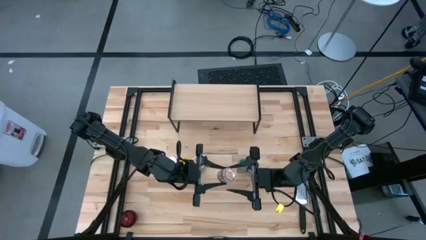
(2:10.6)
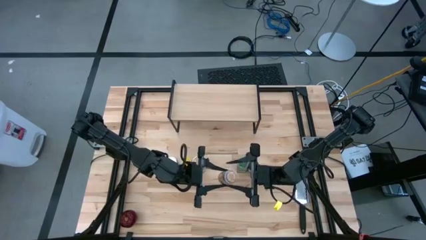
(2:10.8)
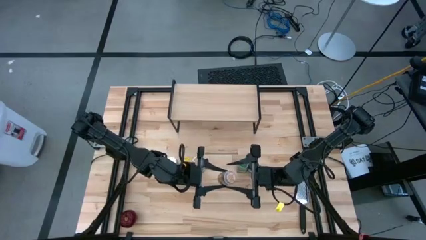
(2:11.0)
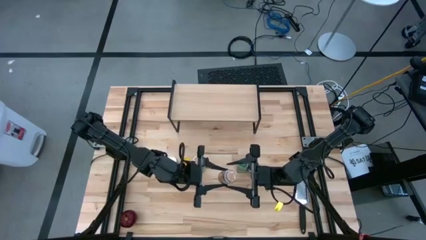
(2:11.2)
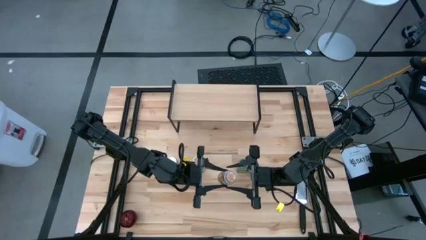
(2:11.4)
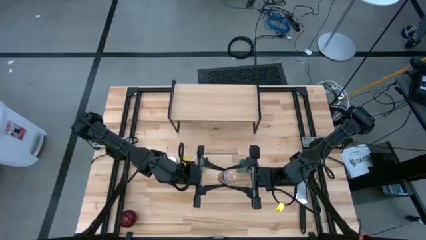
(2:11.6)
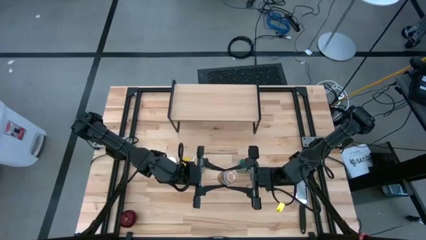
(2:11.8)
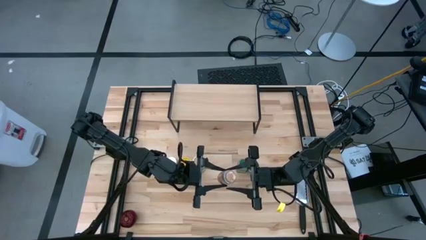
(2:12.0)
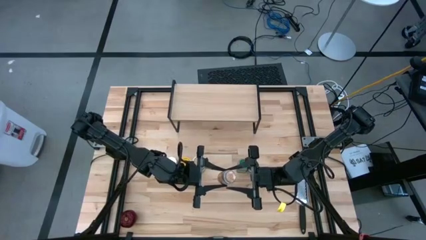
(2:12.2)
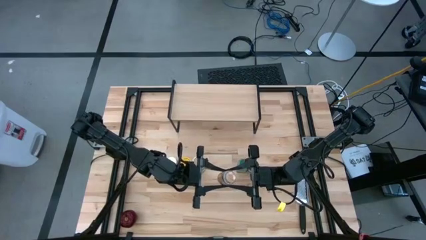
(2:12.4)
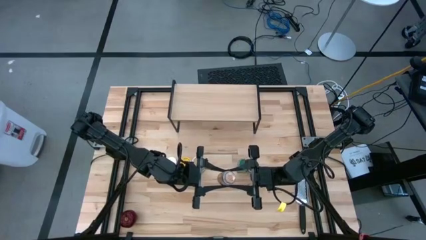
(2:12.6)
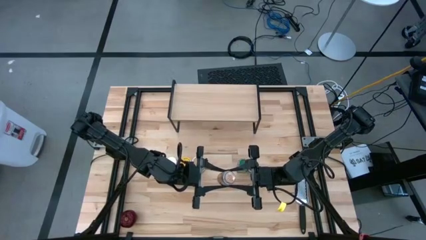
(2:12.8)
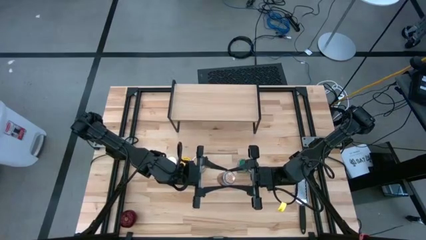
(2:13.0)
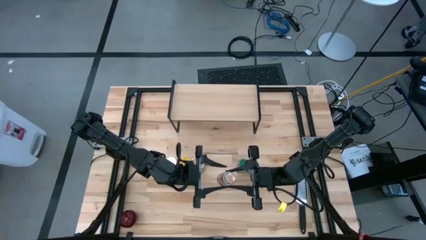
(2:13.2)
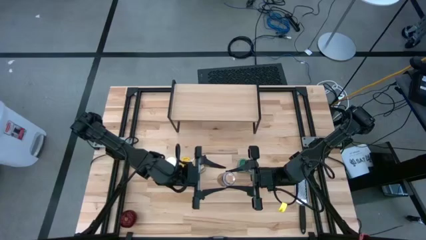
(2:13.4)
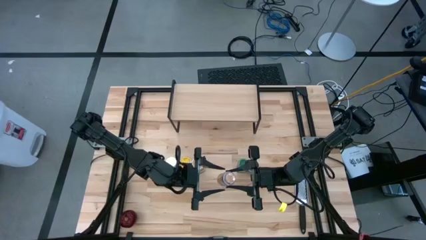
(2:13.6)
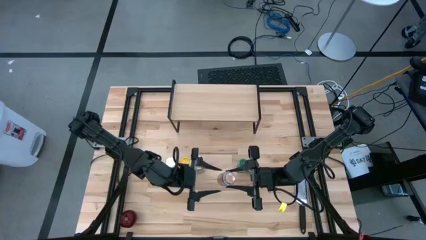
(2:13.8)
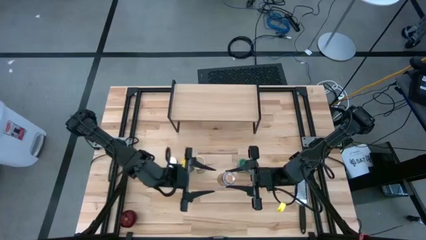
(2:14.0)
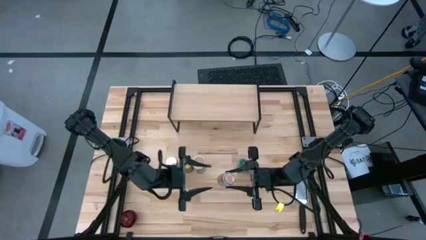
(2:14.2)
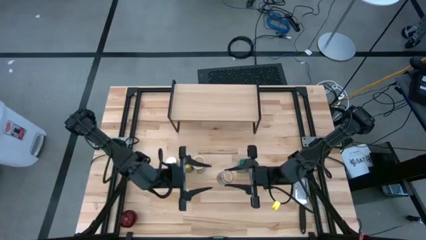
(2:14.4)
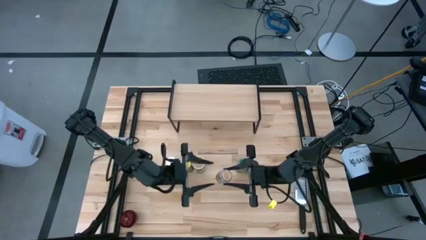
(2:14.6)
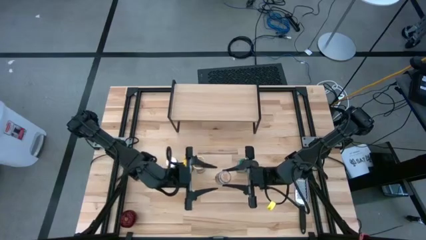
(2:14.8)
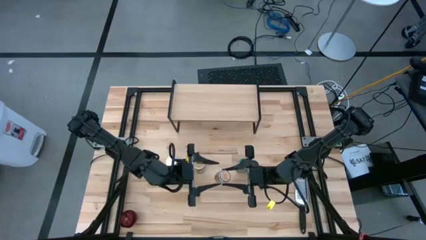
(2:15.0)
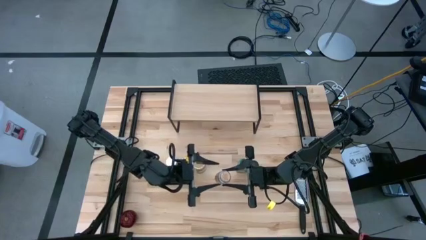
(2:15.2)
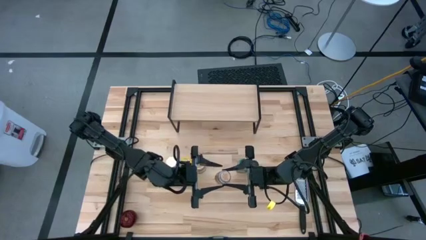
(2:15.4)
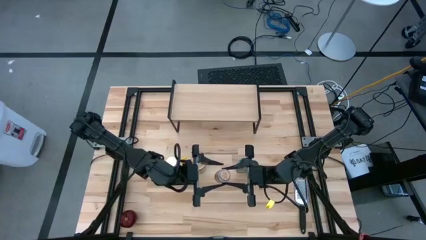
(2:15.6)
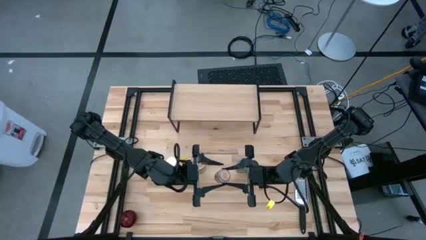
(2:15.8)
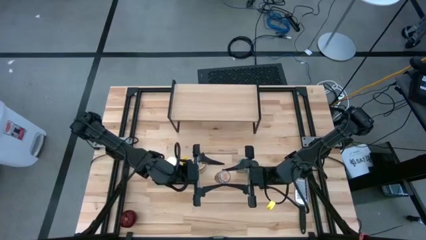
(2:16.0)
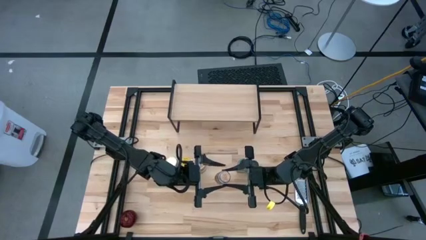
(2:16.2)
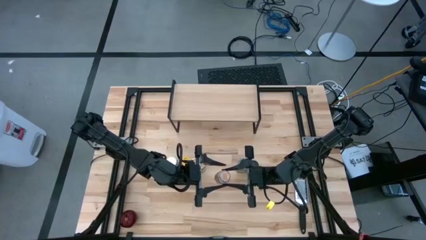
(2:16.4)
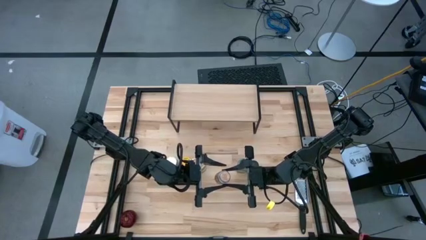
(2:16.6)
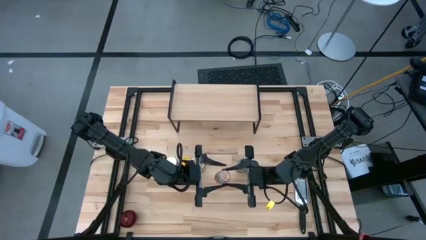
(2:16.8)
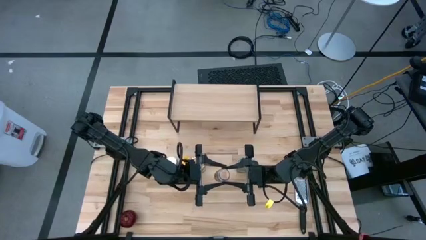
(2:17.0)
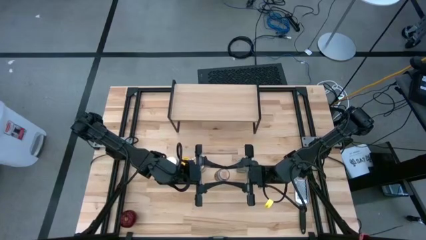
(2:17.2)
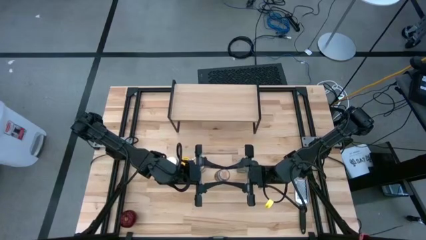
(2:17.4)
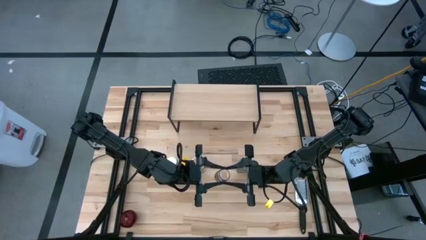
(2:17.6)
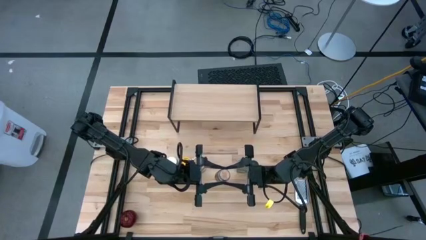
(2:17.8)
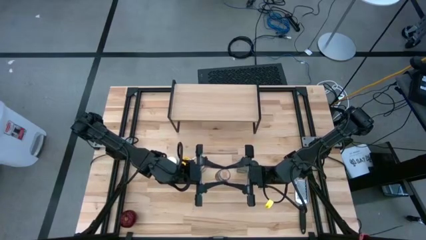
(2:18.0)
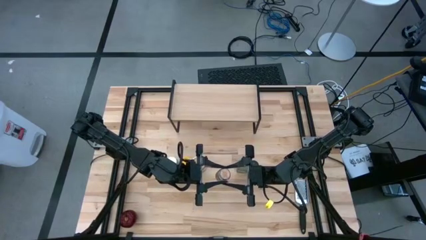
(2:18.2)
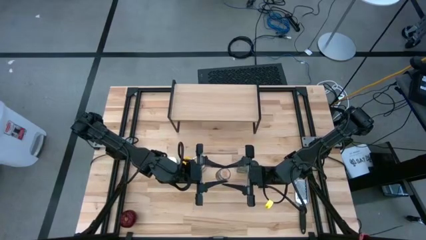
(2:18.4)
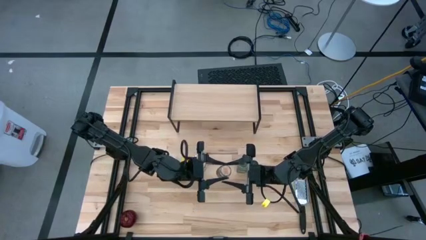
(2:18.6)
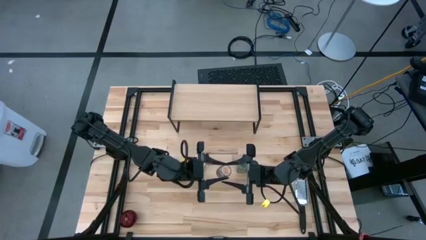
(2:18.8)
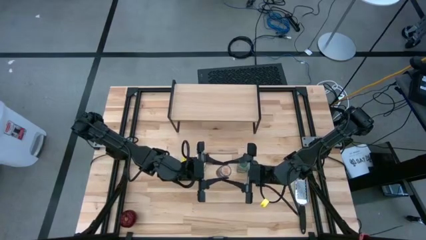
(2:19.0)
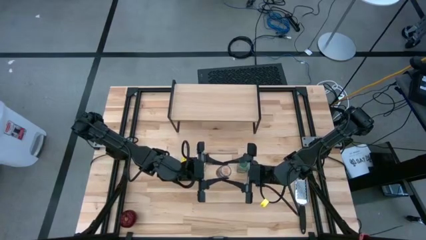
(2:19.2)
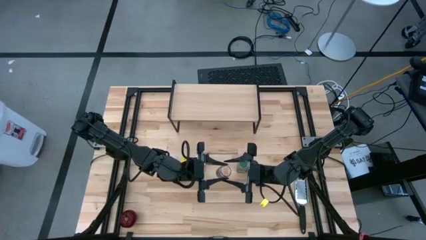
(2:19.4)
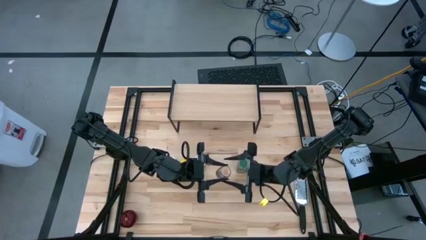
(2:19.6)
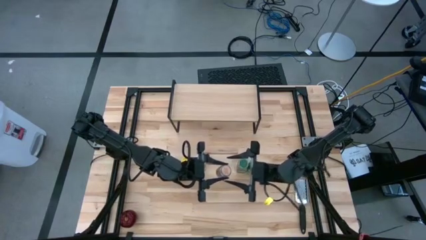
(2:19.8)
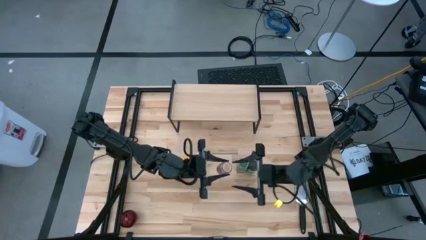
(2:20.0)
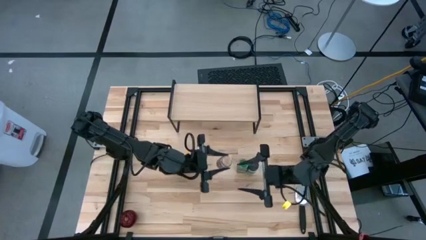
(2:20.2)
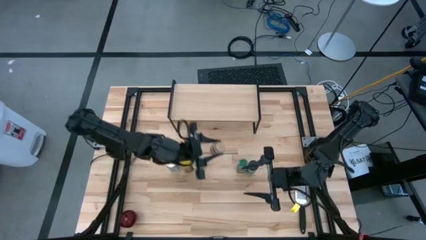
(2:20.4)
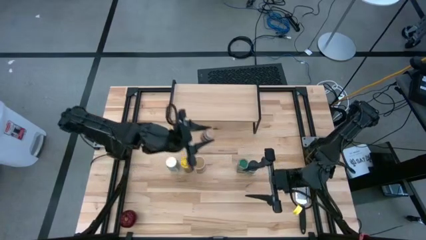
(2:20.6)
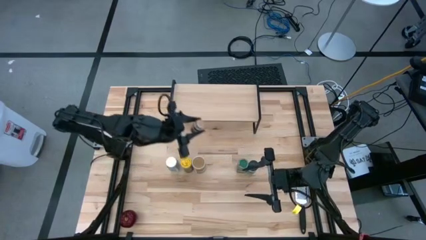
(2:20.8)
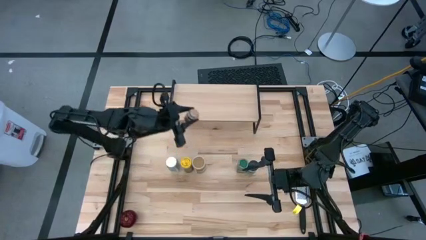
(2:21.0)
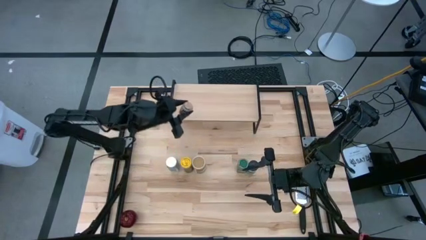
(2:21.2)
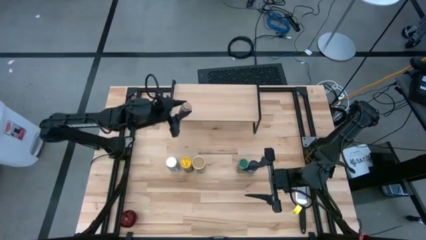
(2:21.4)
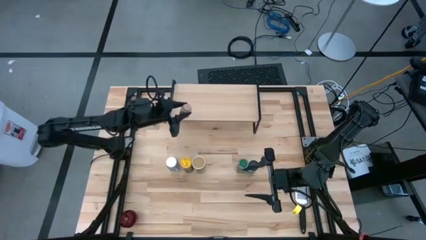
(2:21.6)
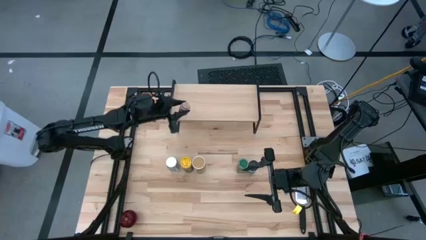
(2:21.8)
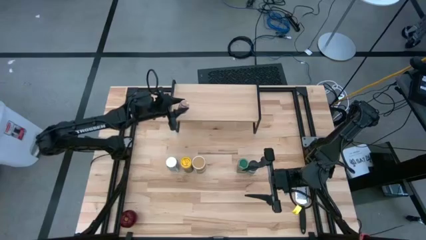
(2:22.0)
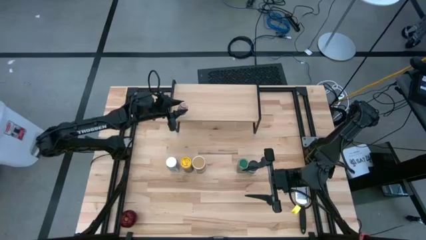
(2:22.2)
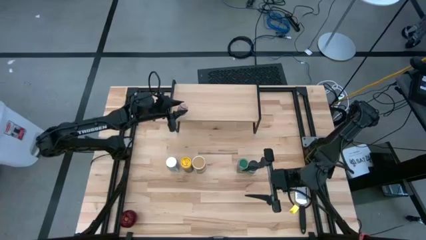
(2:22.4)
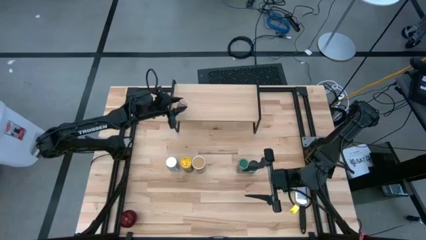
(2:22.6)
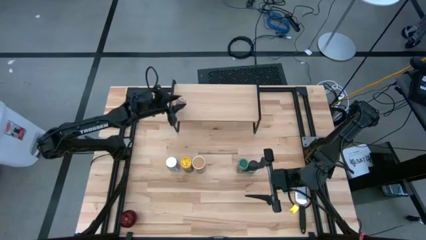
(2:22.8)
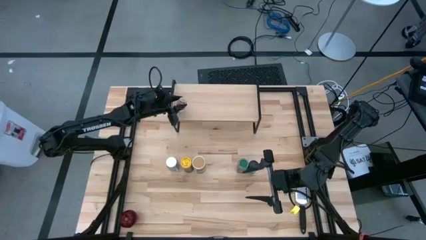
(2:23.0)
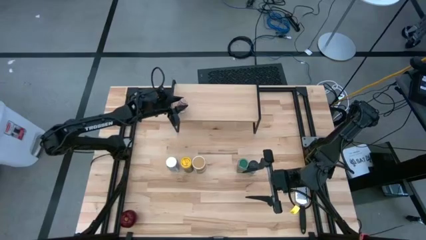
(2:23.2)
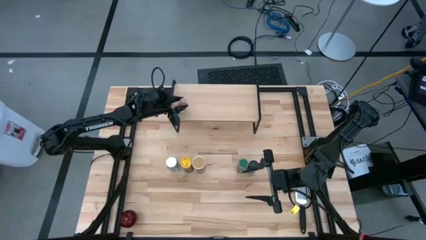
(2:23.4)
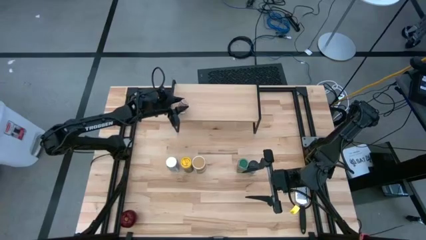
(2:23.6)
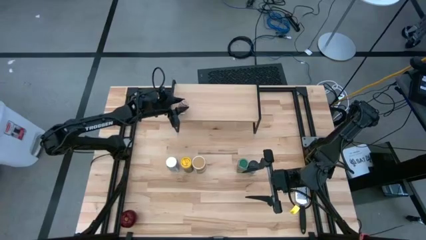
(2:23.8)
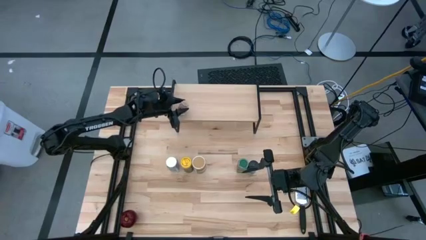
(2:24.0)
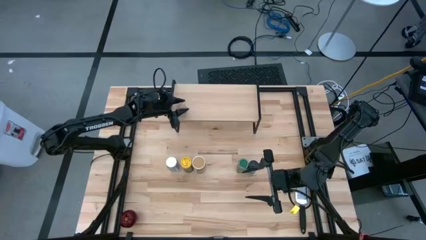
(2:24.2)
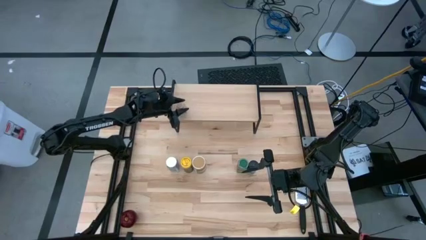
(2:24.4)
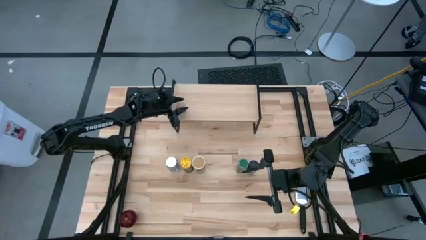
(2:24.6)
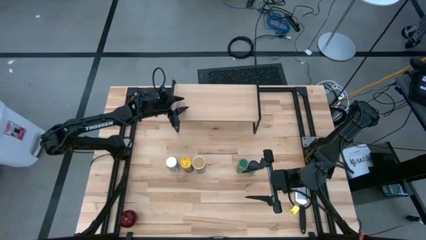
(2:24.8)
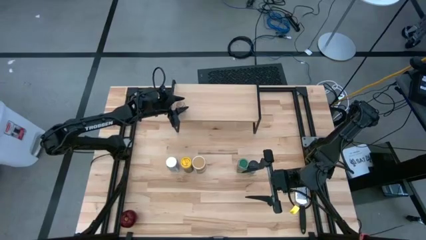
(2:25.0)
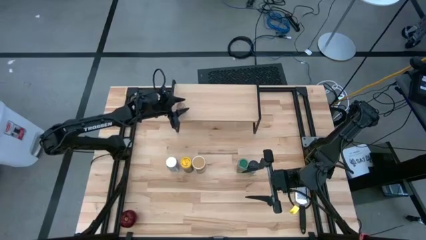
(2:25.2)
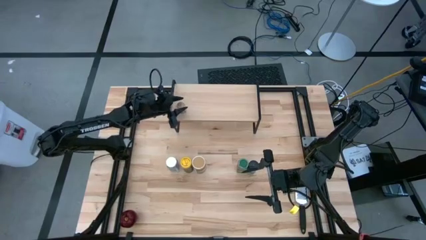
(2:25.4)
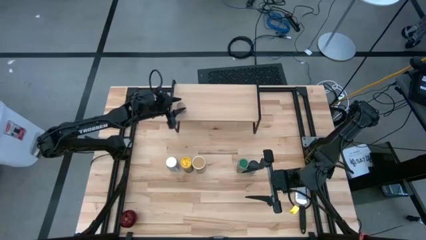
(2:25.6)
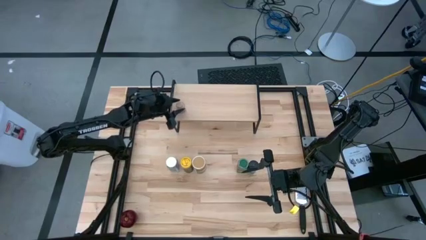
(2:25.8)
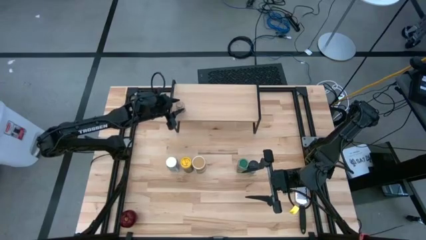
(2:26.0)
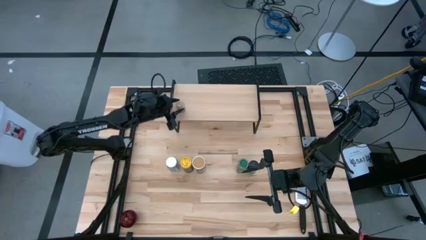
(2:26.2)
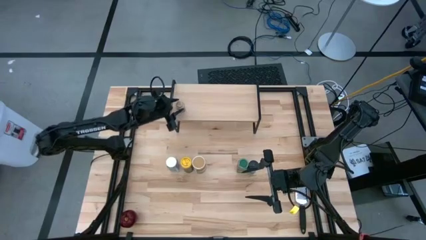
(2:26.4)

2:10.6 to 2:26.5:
Task: Shelf spices
Put the transparent seasoning bottle on the shelf
